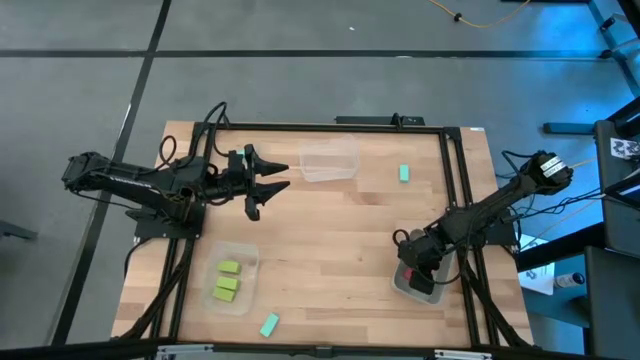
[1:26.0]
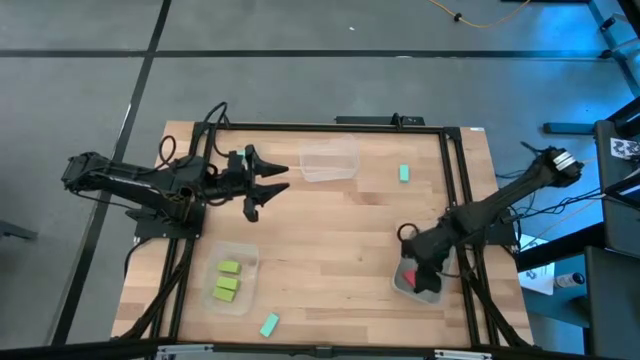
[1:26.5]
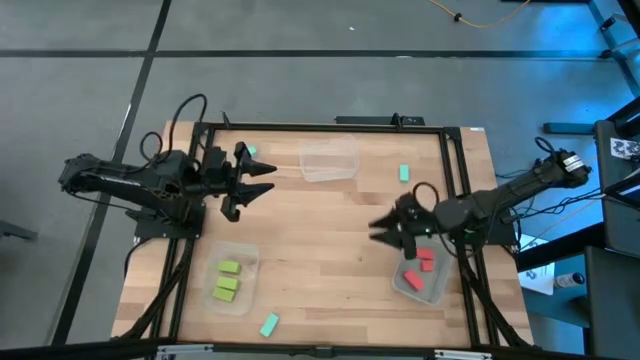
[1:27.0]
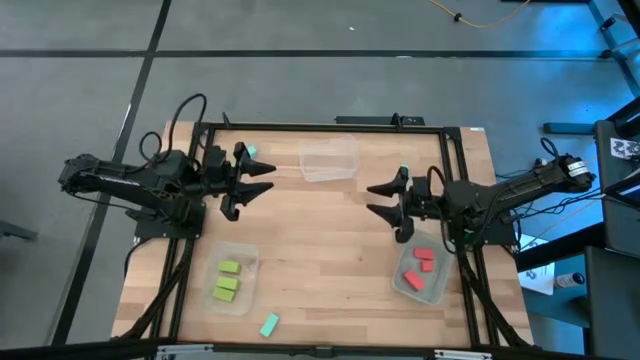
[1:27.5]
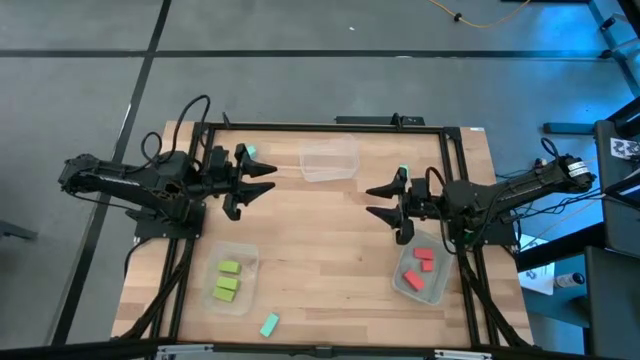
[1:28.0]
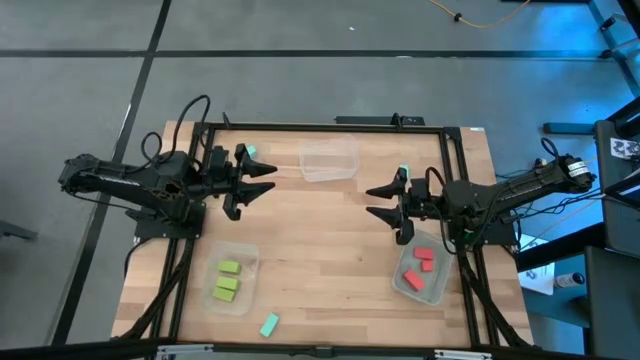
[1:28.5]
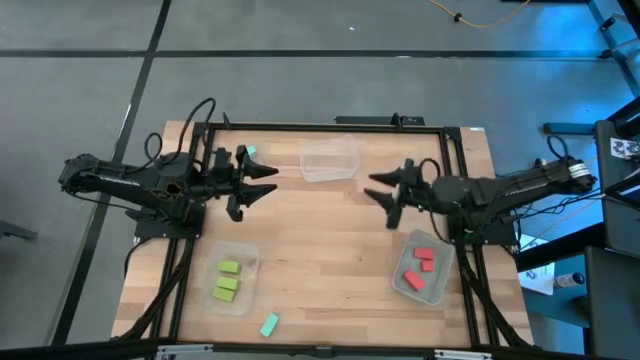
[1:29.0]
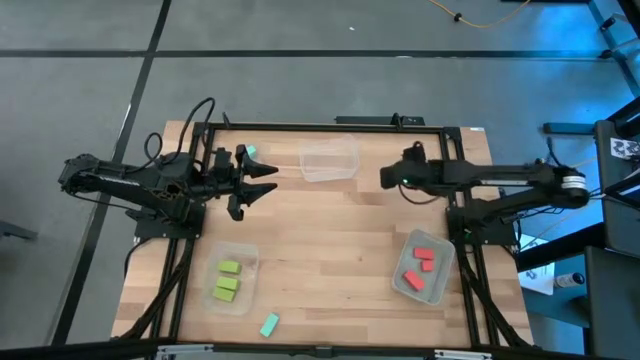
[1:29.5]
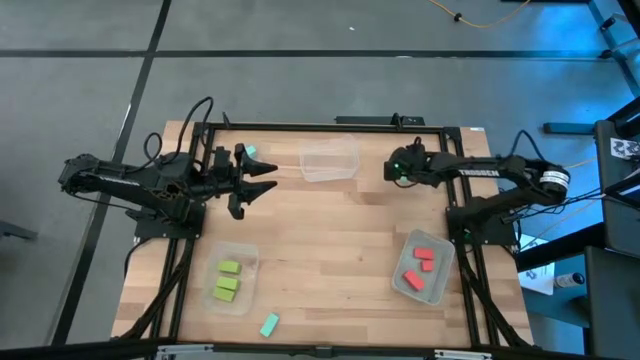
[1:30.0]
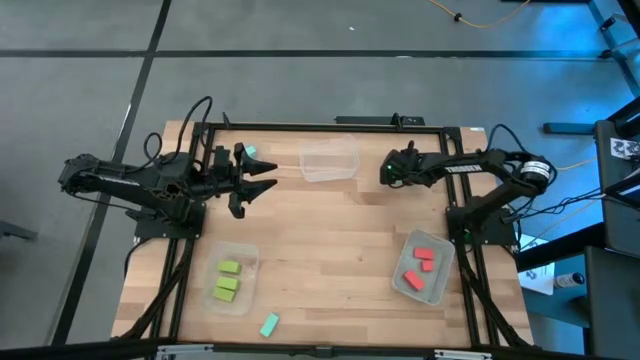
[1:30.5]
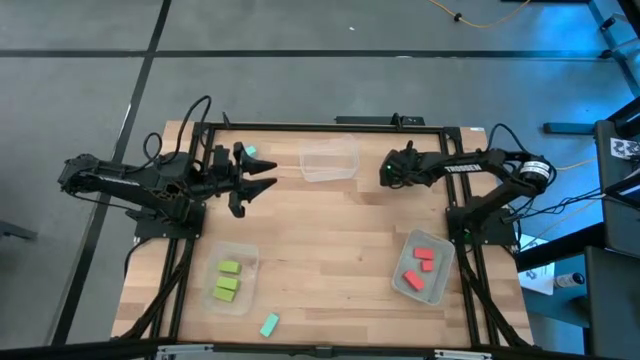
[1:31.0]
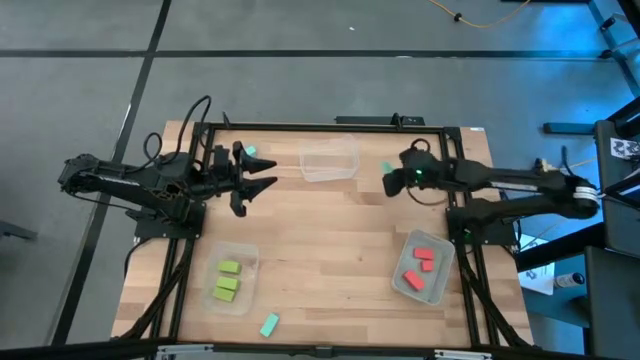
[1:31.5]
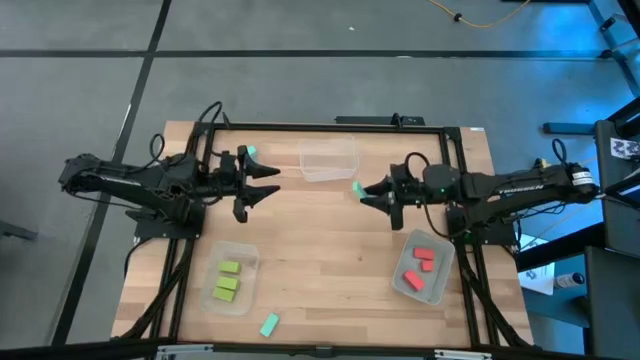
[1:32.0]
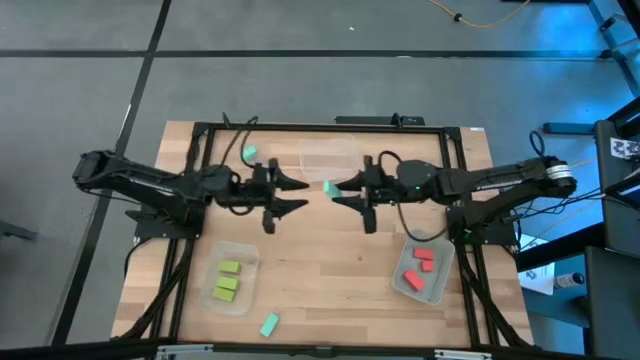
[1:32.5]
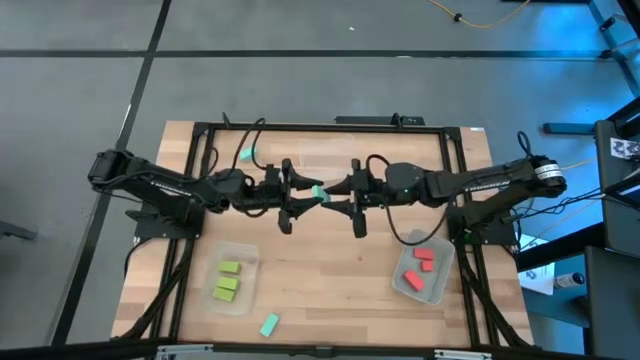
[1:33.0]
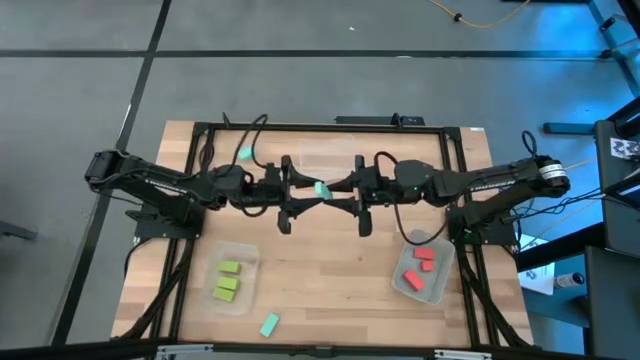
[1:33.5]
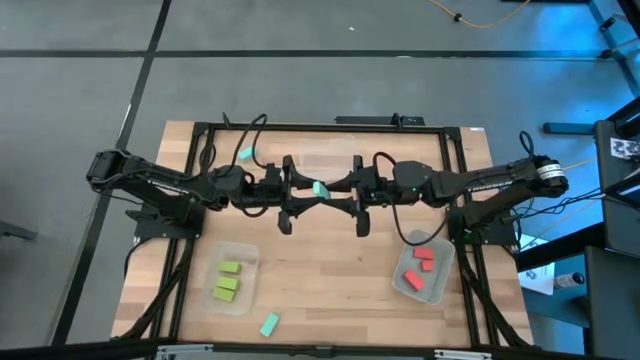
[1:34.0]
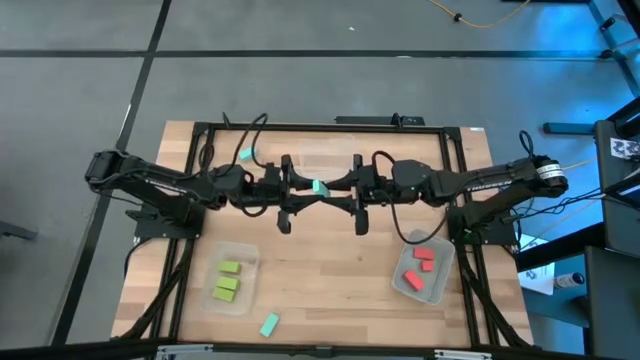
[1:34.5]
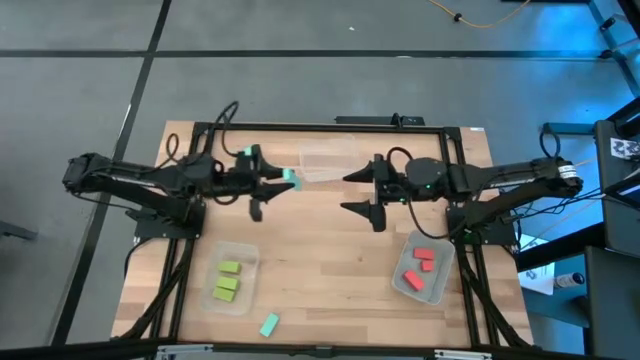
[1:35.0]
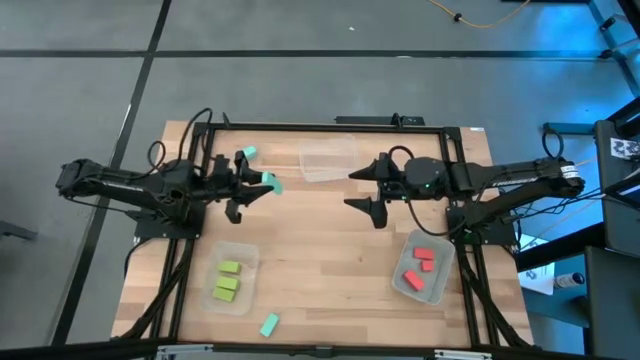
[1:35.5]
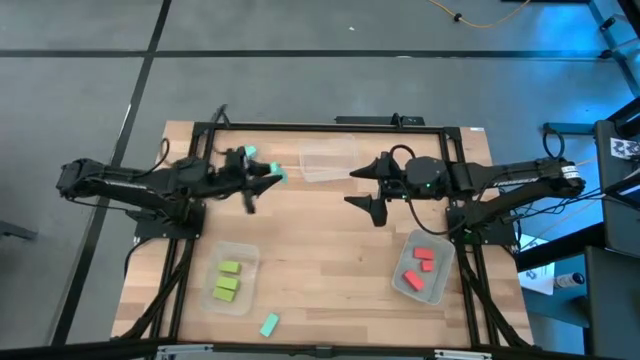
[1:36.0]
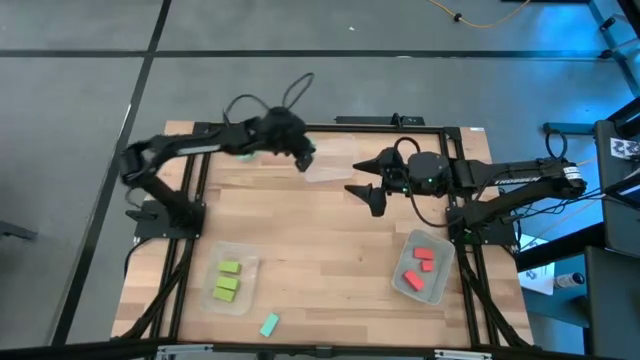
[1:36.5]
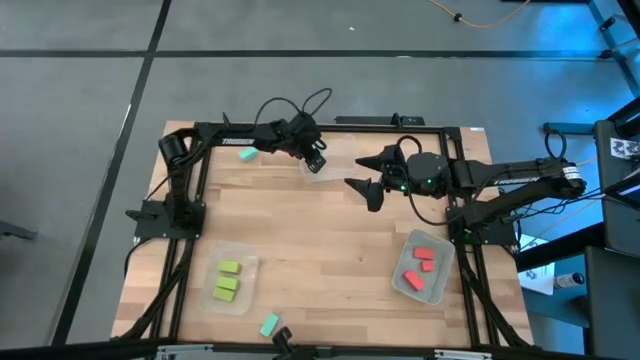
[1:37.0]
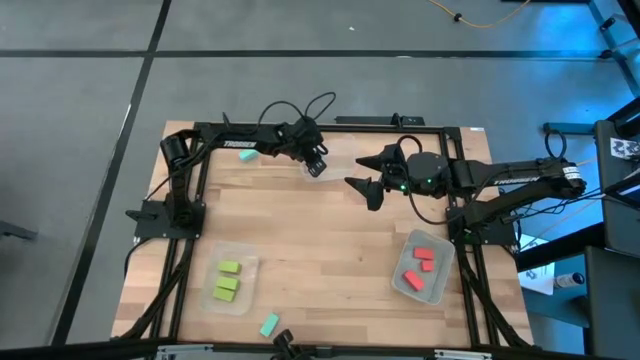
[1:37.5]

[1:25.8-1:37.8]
Task: Sort & place blocks by color
Put the top right blue block into the top transparent bin

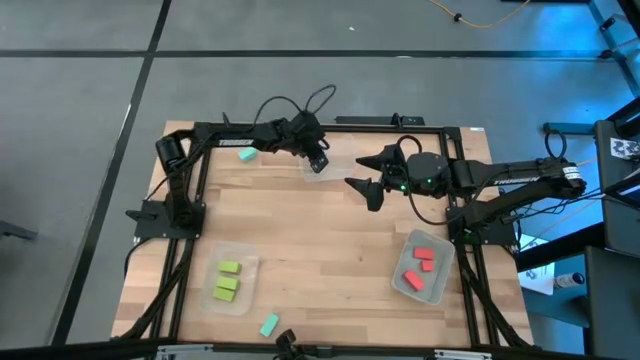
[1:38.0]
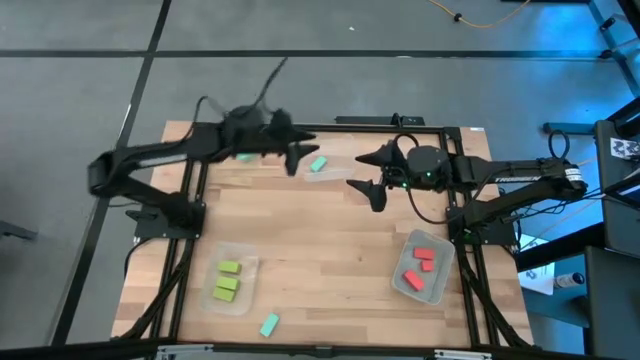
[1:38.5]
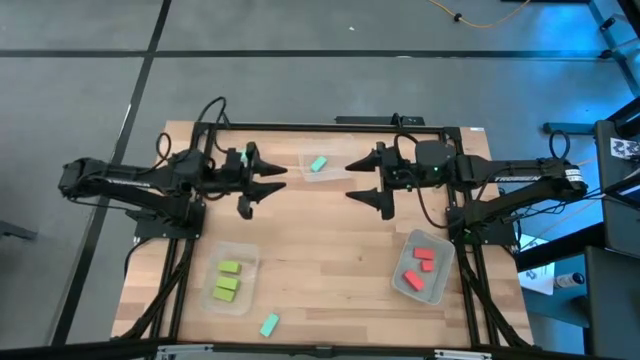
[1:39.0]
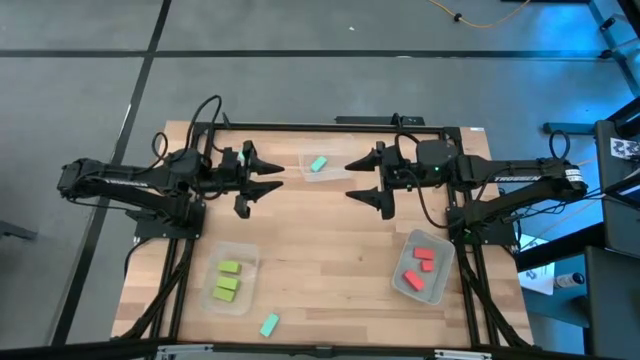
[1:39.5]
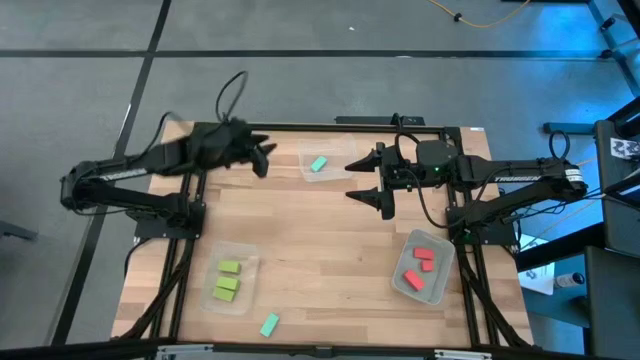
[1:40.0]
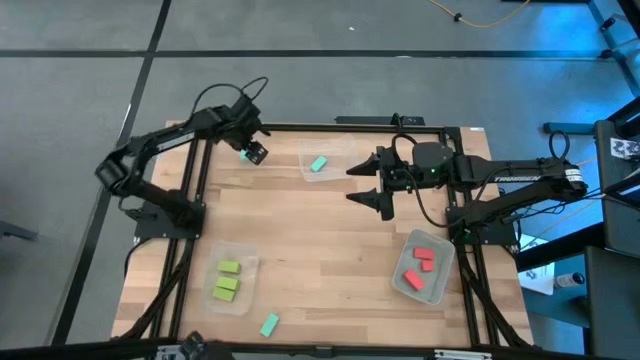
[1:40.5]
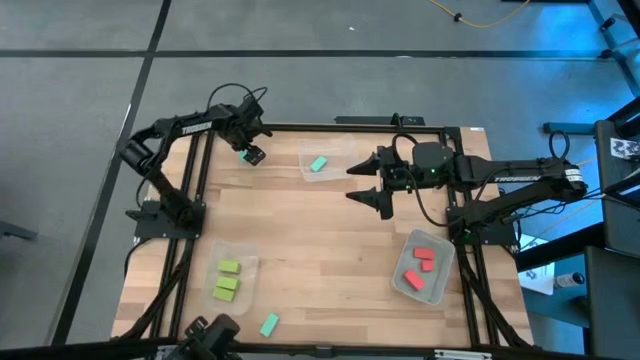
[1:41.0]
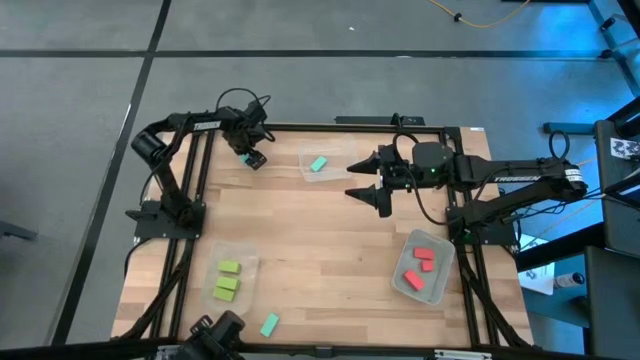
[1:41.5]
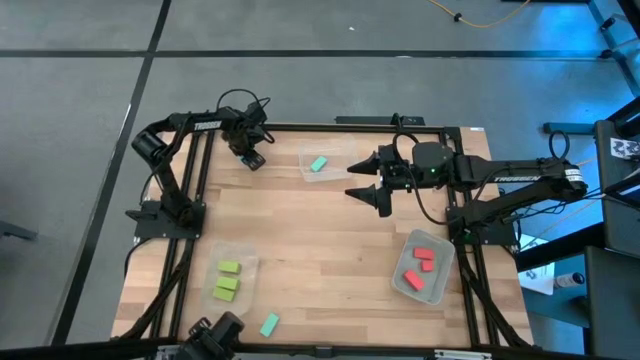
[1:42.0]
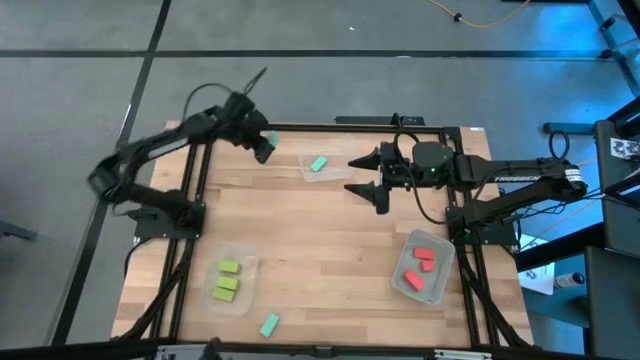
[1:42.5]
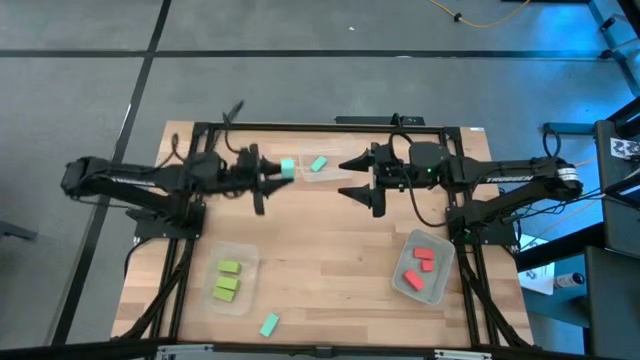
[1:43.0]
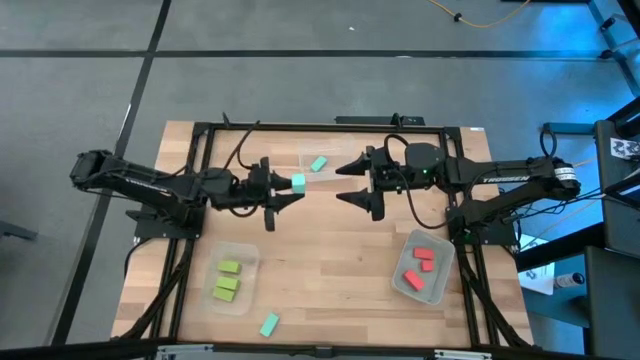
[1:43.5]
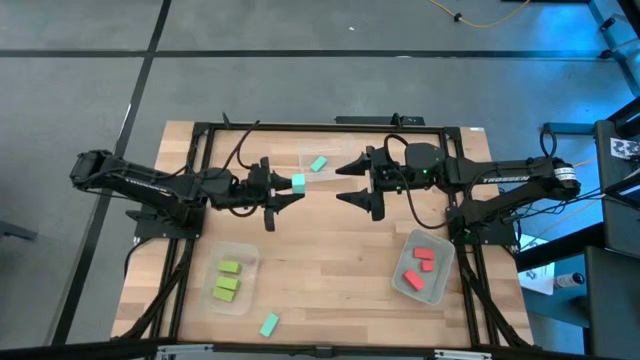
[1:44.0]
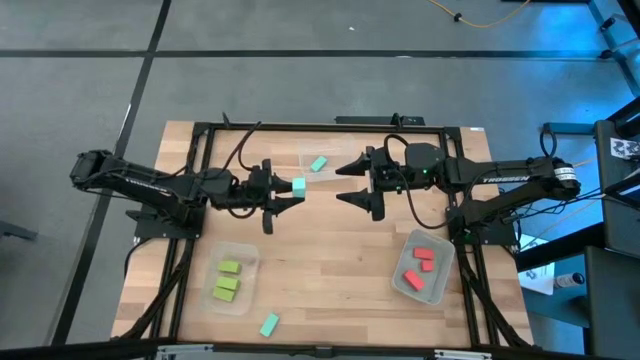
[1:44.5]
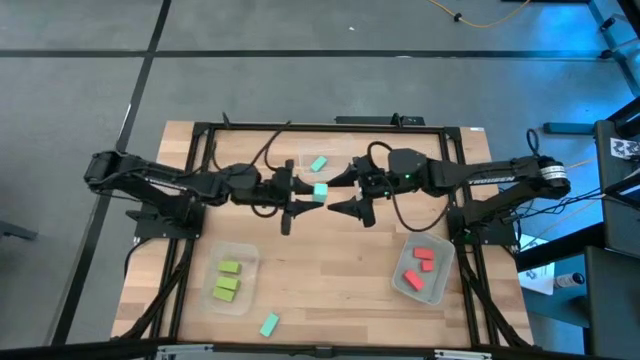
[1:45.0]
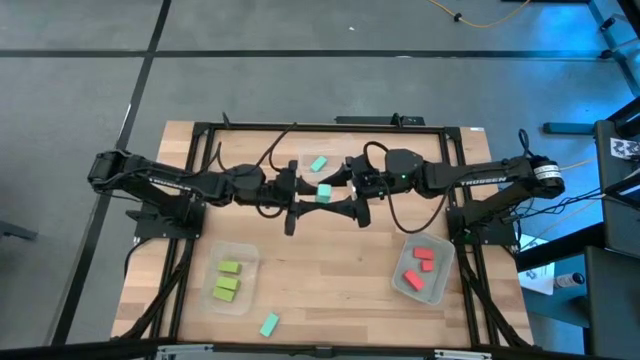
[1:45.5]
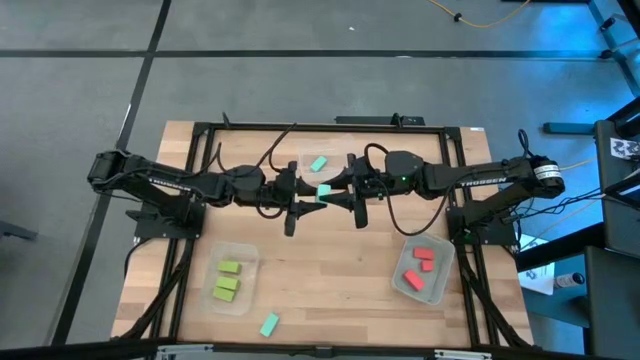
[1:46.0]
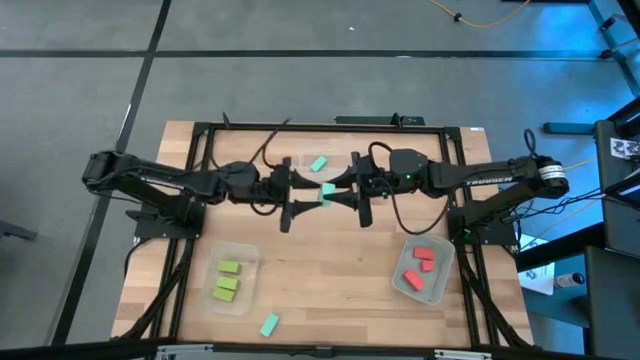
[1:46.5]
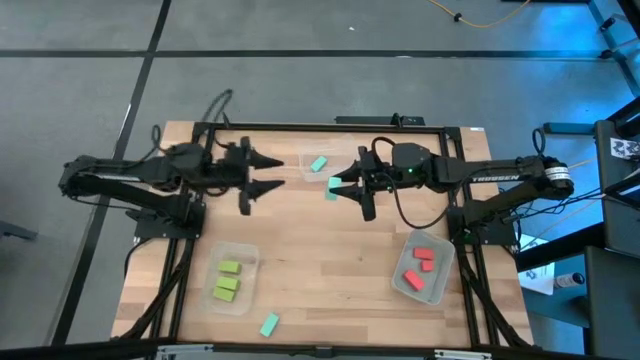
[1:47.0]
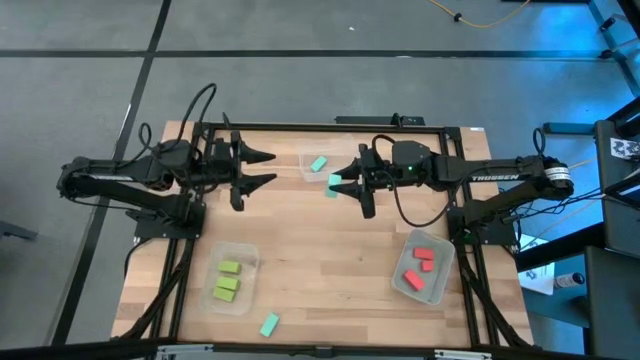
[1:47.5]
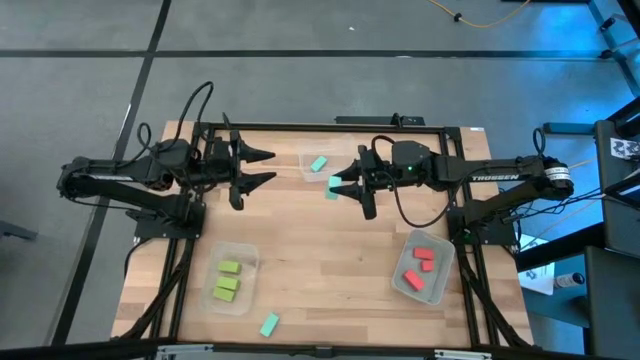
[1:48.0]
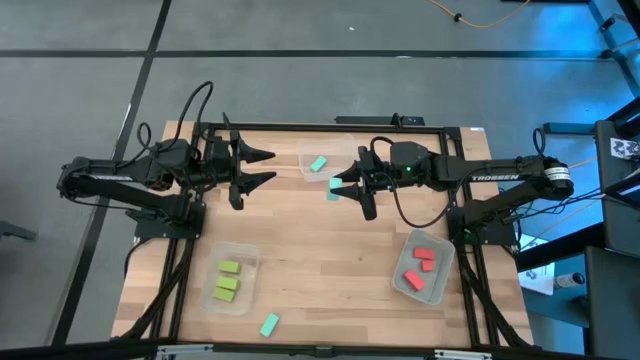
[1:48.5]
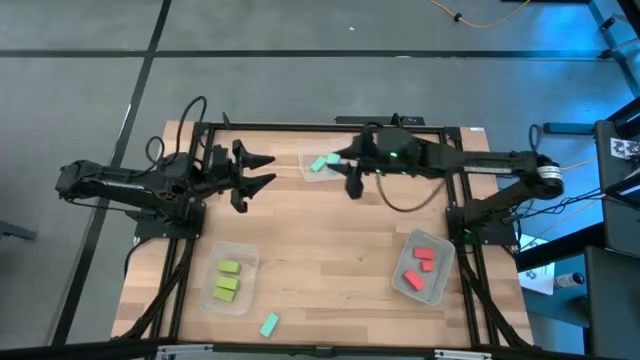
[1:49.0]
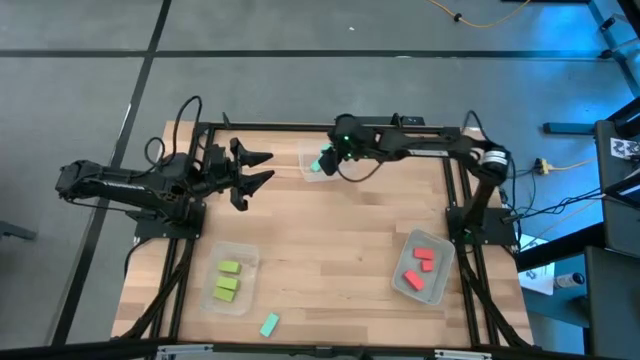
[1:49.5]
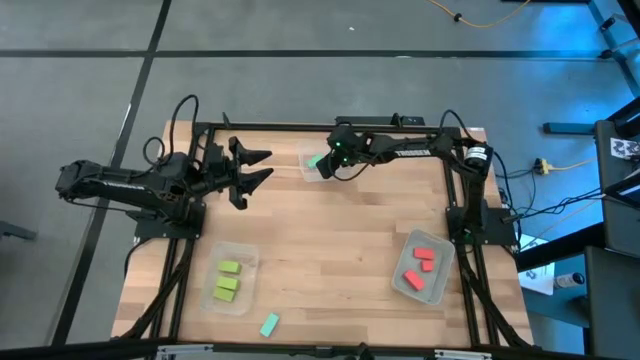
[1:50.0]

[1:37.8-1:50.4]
Put the top blue block into the top transparent bin
